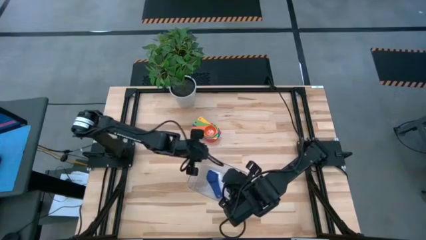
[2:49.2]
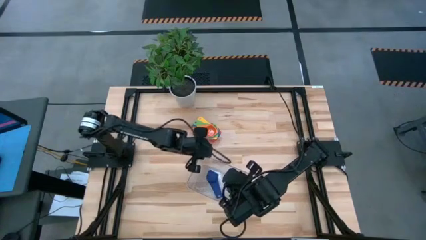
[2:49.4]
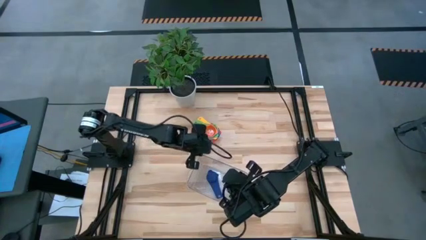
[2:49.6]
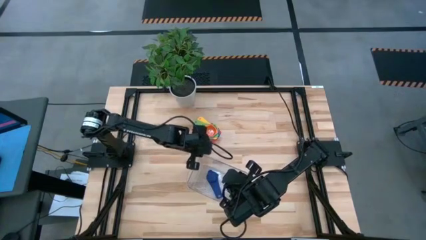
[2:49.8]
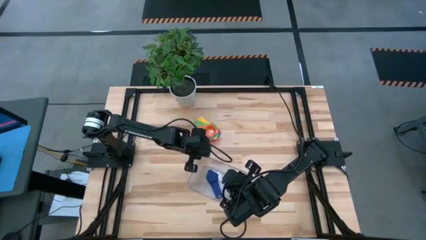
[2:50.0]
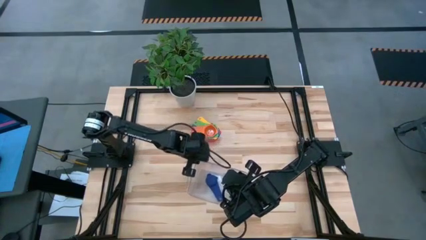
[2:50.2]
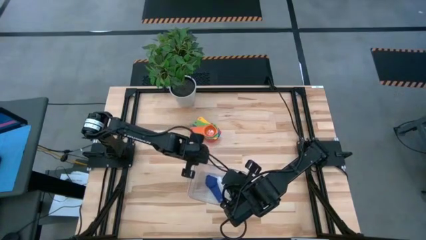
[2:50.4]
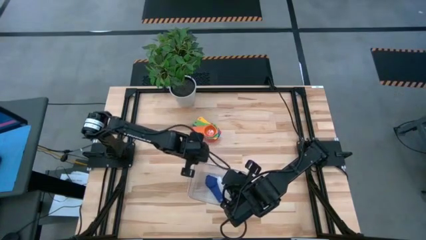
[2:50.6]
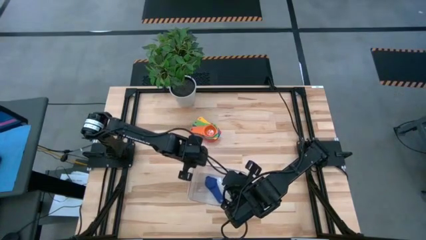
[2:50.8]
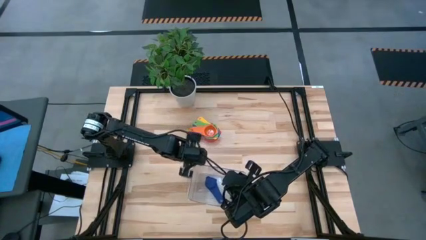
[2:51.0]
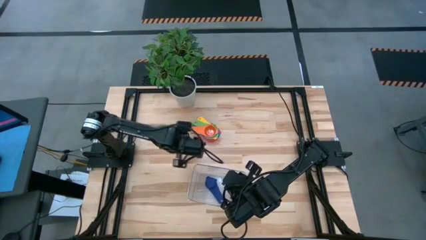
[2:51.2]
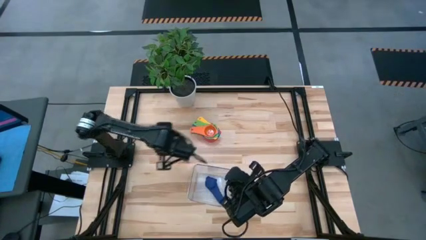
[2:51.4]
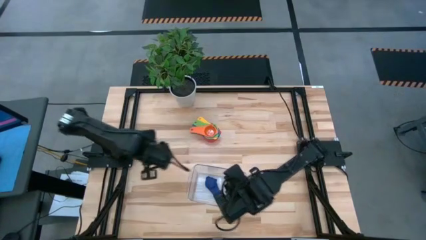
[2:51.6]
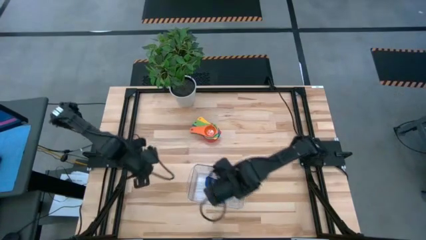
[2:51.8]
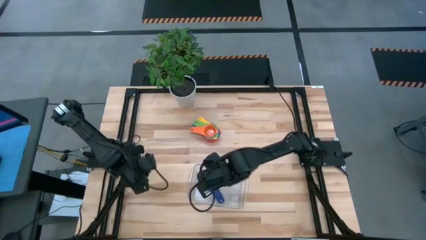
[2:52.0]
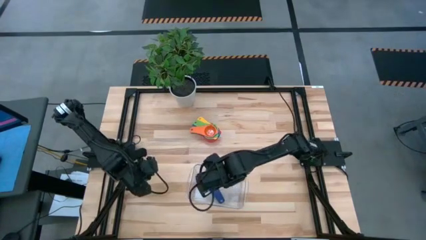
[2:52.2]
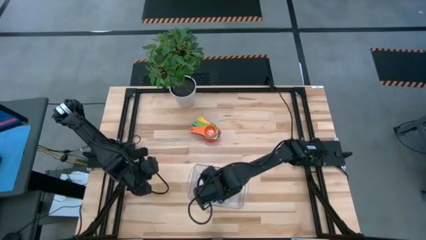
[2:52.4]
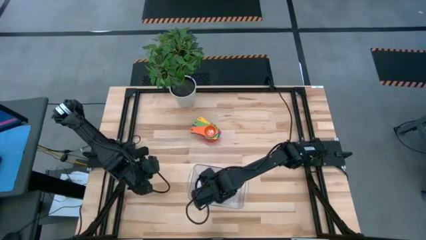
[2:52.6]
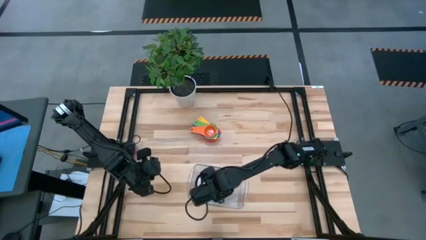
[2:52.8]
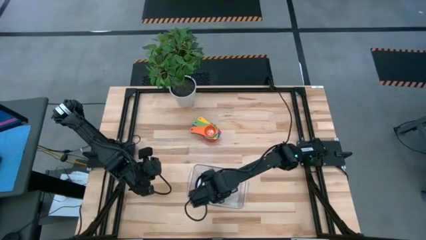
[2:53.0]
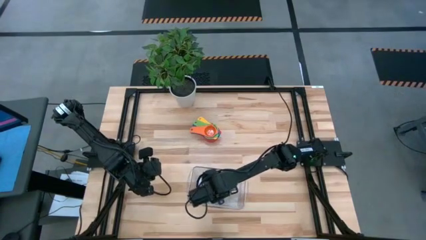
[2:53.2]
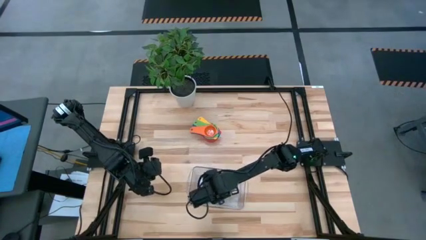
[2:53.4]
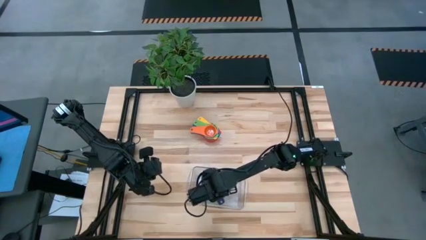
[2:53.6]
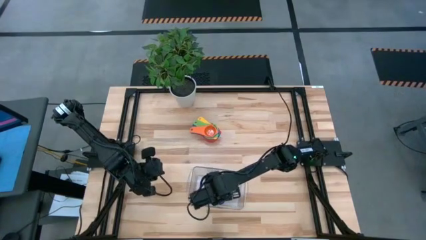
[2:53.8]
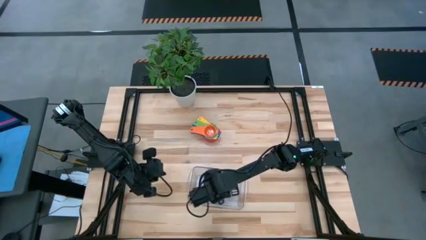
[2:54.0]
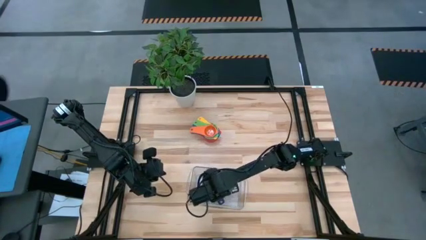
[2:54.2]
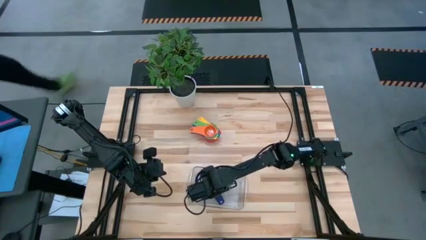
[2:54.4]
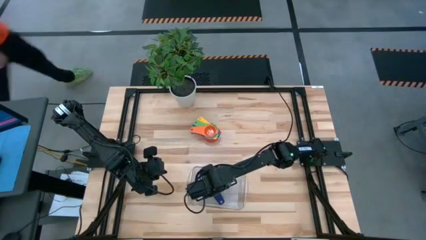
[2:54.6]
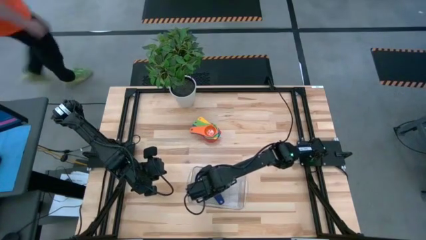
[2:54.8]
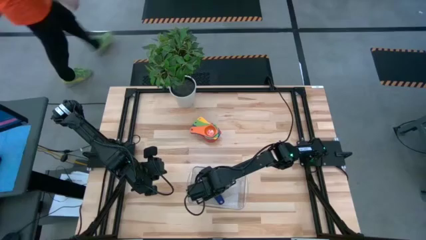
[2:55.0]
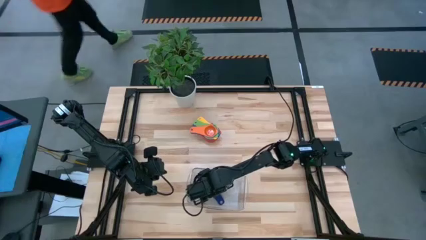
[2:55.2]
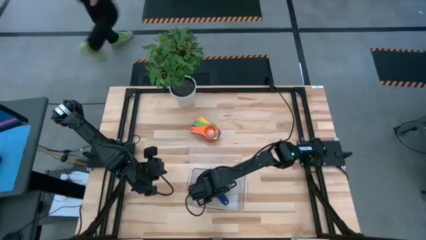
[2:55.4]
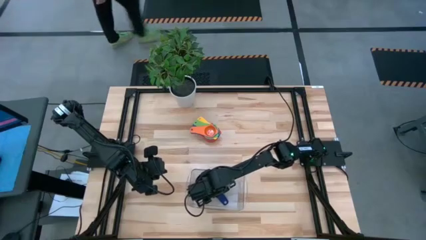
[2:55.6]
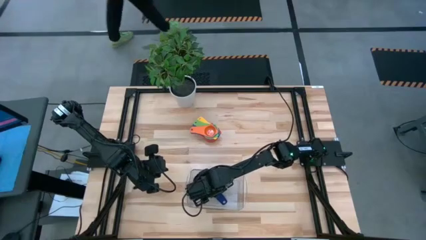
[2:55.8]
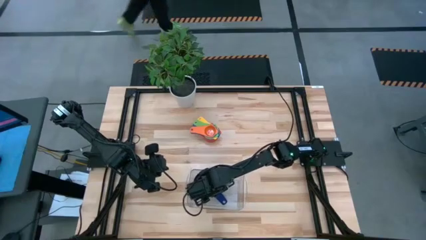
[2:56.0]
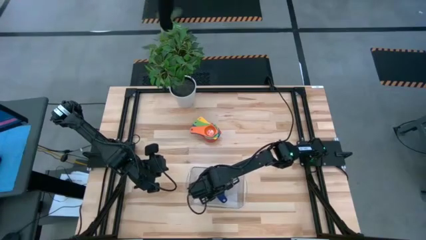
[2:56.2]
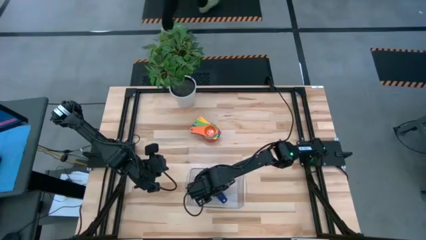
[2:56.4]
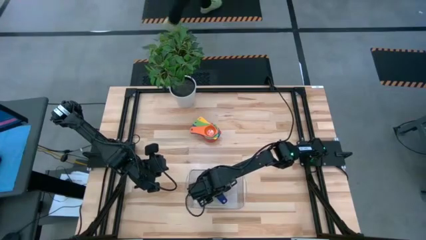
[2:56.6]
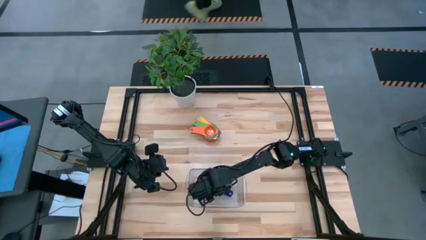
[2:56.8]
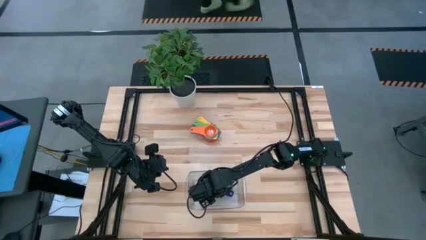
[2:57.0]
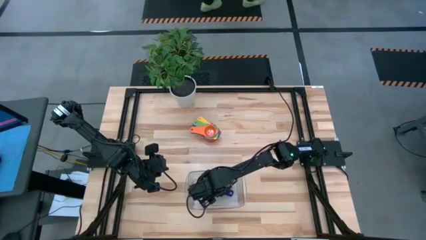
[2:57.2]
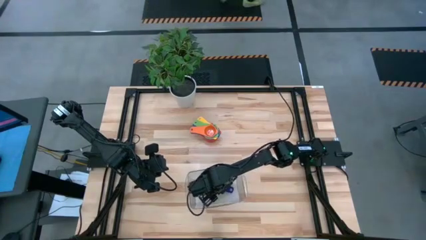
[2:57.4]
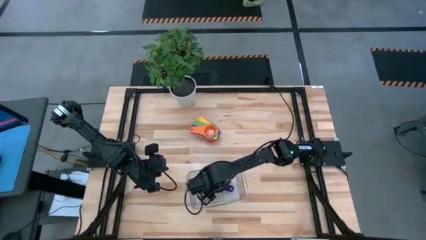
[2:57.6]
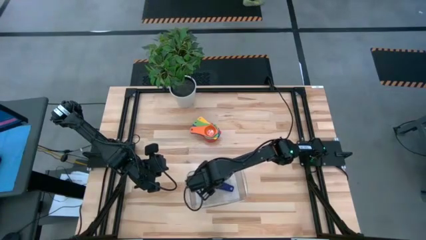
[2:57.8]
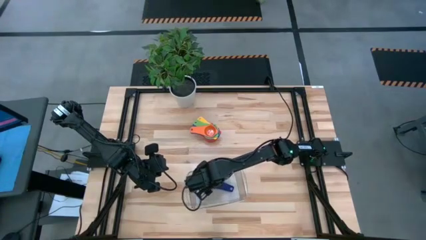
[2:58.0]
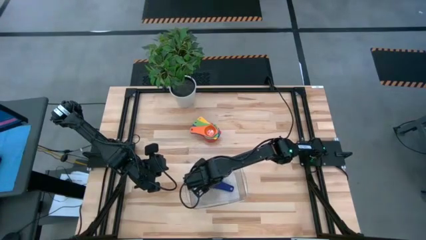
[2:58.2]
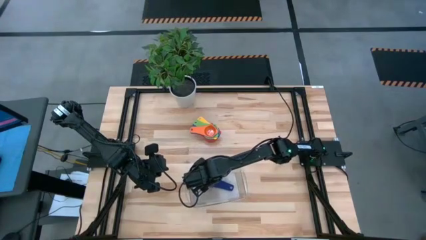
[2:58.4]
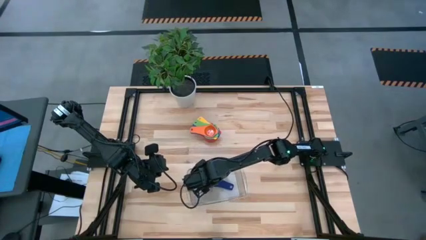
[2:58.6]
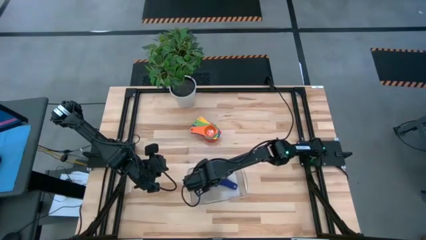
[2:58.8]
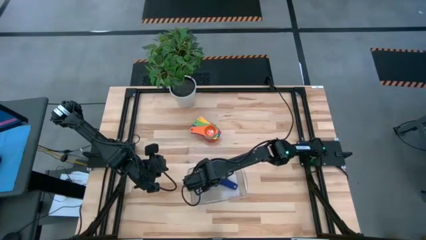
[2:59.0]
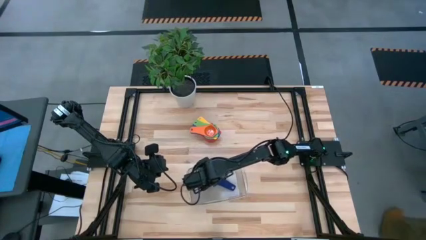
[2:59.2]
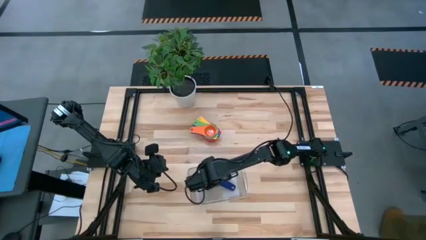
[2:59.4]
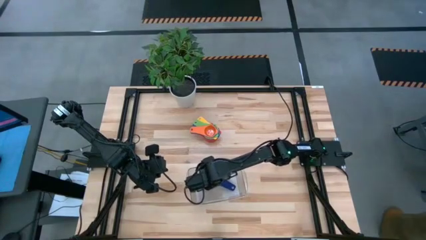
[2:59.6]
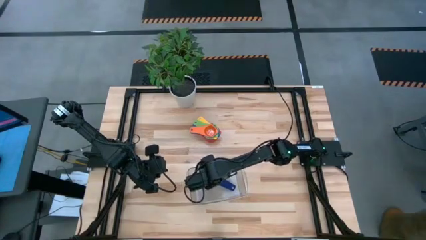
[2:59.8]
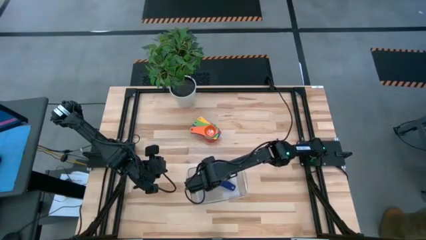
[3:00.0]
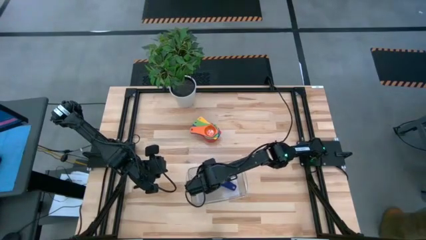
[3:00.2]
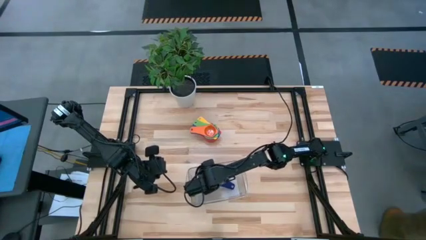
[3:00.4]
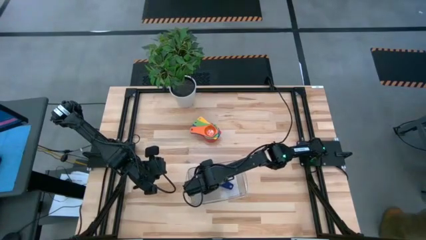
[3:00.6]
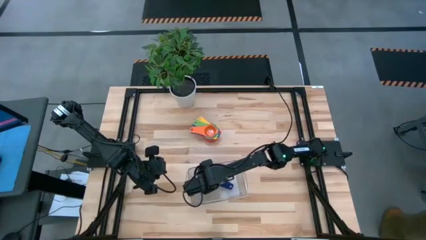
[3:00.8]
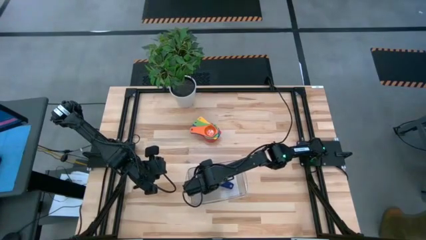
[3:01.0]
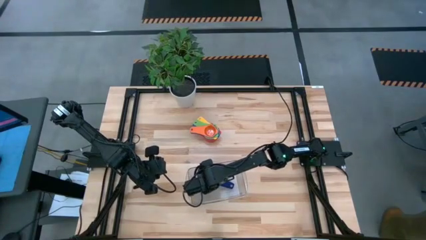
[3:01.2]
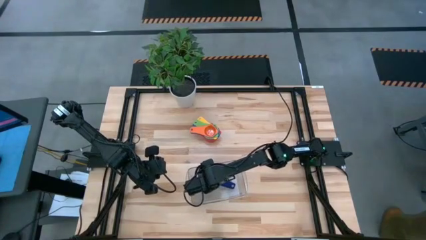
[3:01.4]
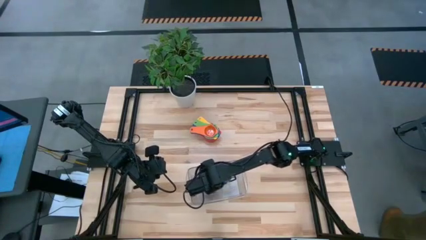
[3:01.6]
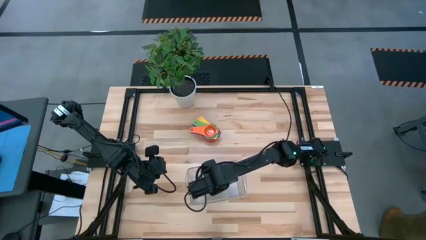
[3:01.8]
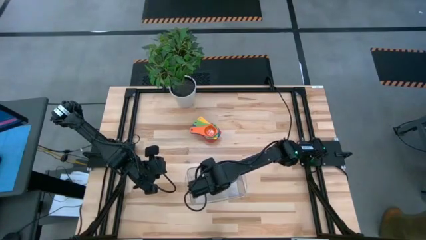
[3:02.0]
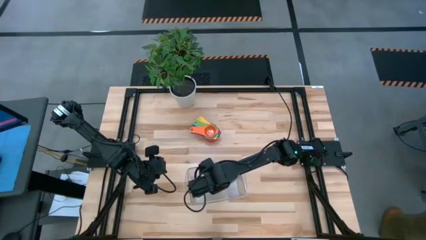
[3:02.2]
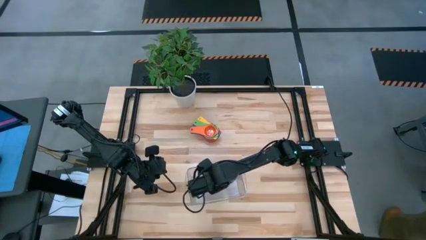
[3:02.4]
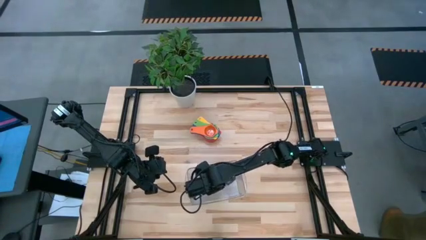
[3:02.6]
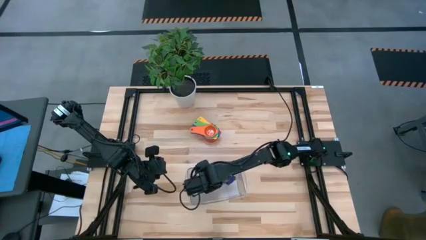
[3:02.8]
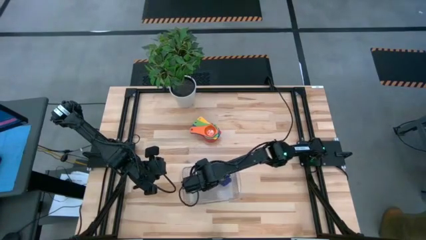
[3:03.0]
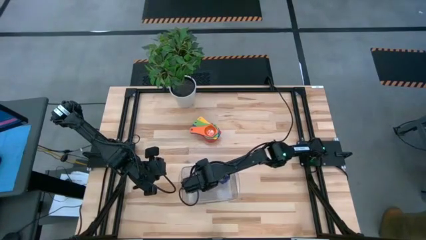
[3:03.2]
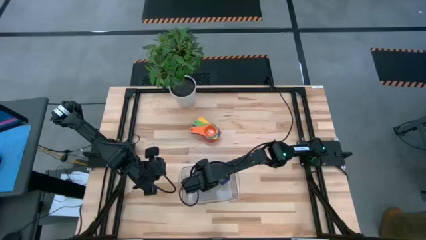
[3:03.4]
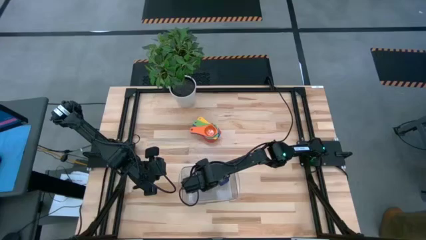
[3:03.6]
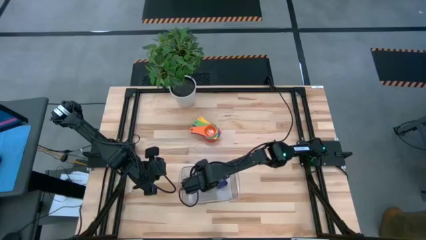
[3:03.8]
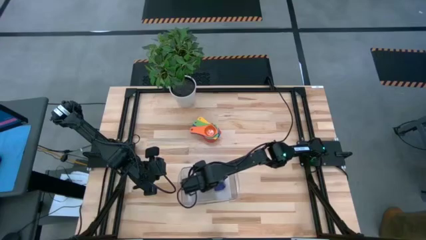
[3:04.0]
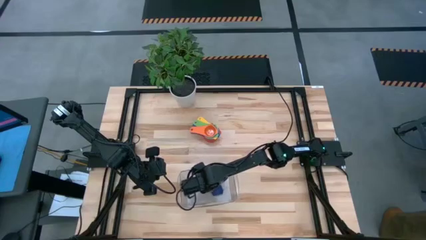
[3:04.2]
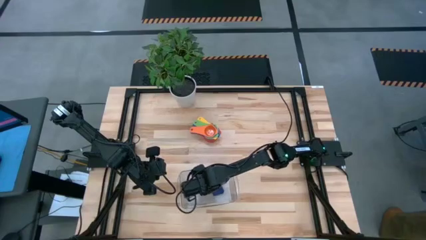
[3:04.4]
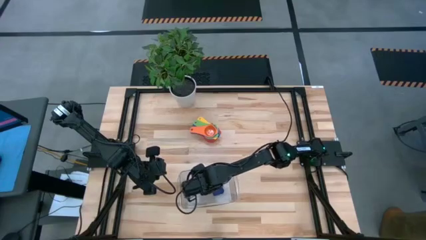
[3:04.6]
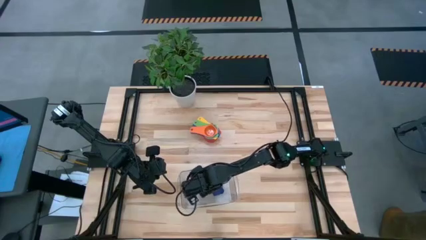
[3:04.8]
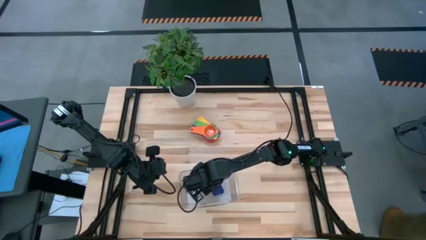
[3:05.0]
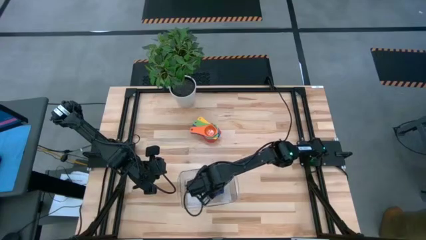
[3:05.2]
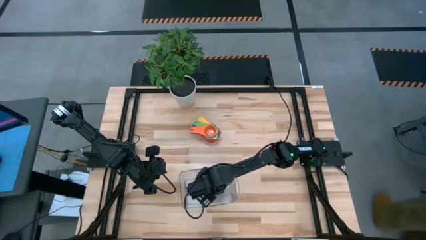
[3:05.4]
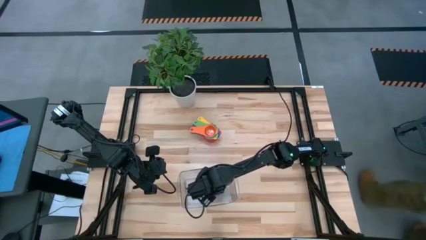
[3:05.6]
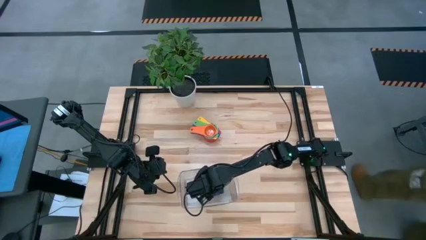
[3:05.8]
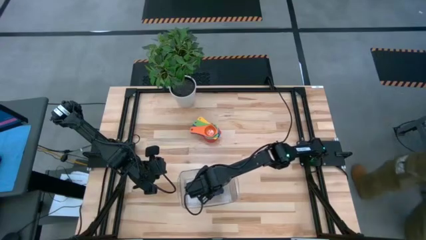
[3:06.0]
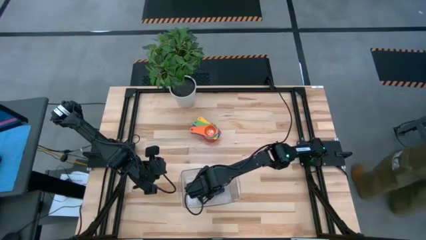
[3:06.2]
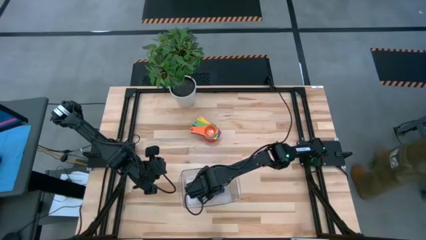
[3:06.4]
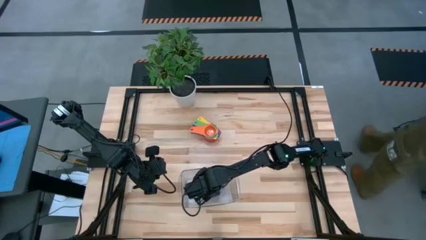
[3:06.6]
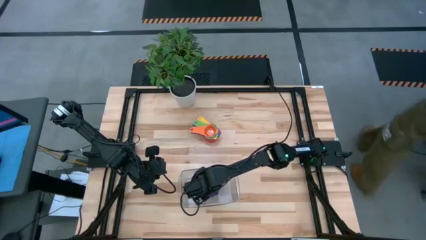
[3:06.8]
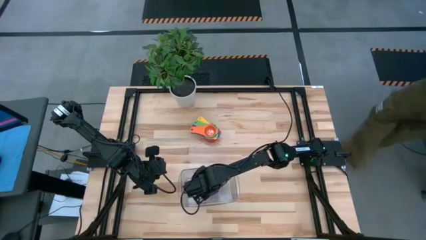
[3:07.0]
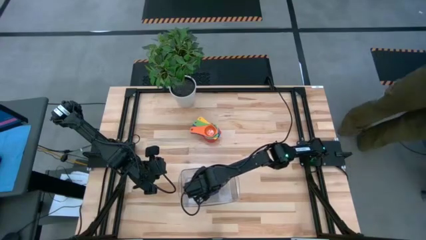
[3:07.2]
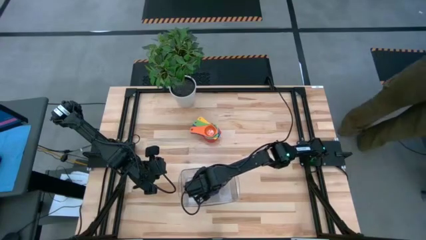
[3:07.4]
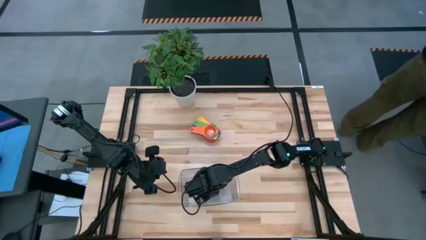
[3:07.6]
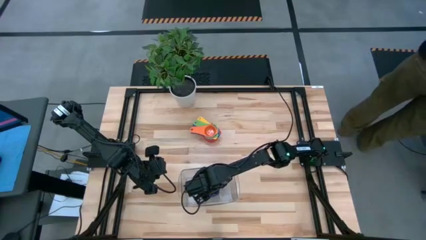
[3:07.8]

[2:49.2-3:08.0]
Task: Nest measuring cups in basket
Stack the dark blue measuring cups on top of the orange measuring cups
